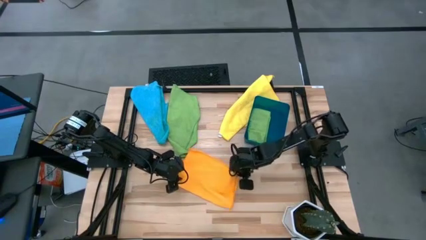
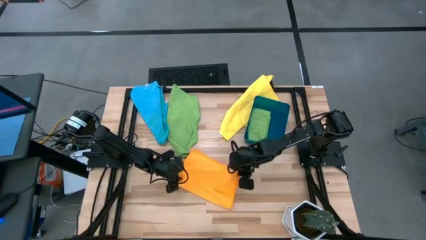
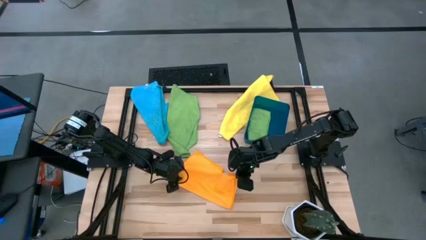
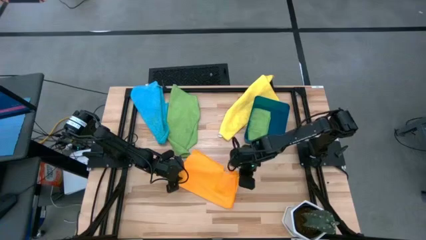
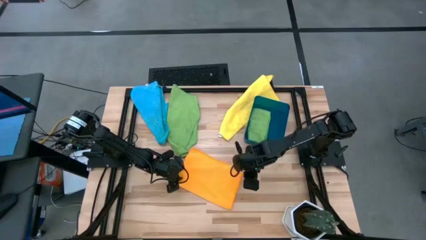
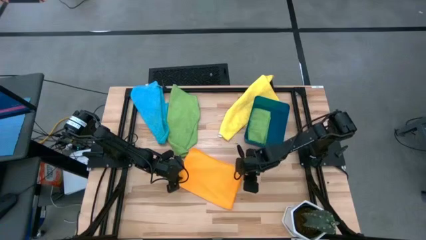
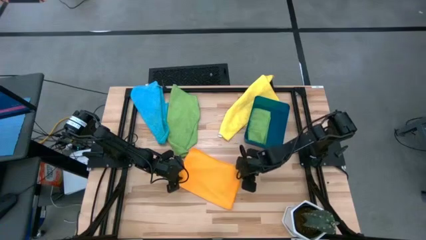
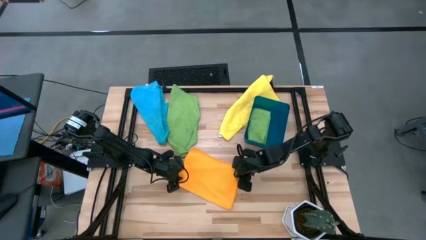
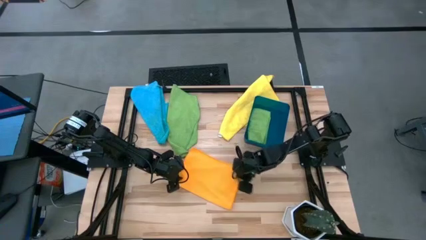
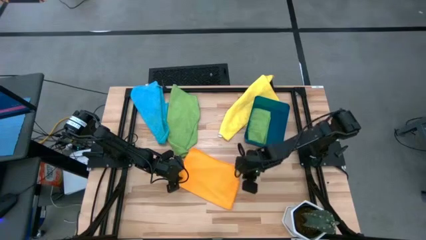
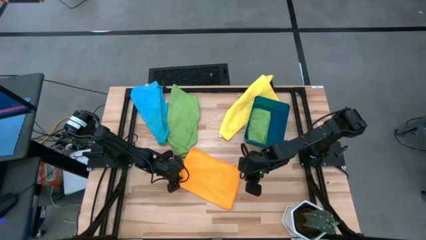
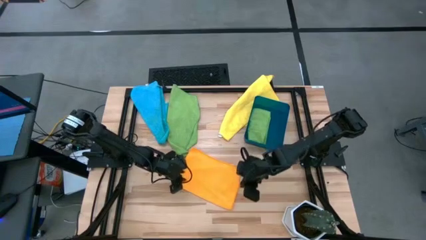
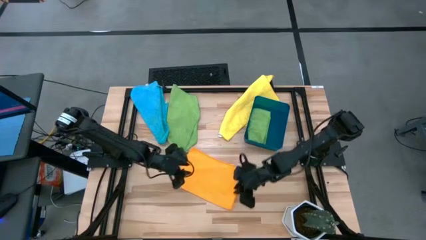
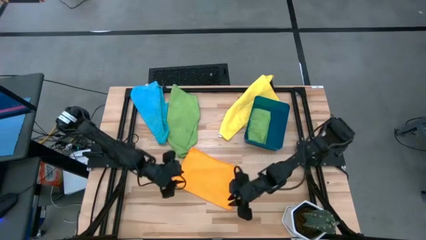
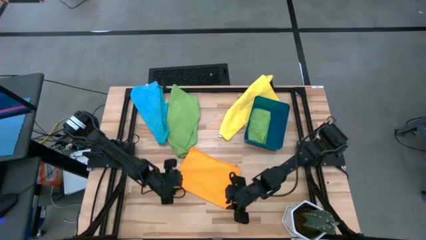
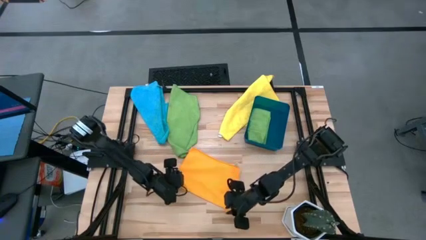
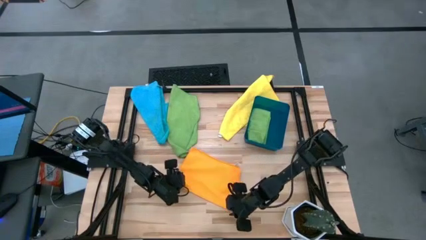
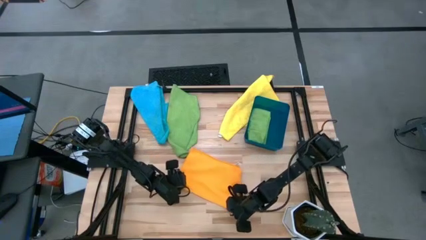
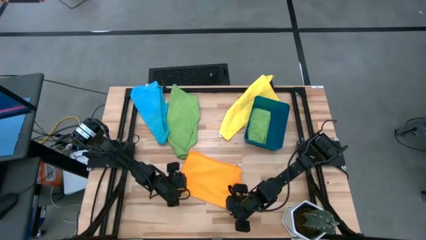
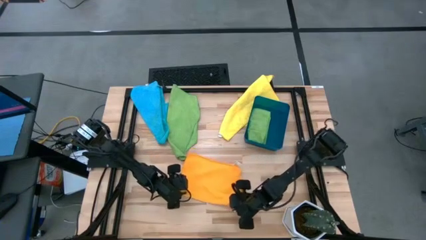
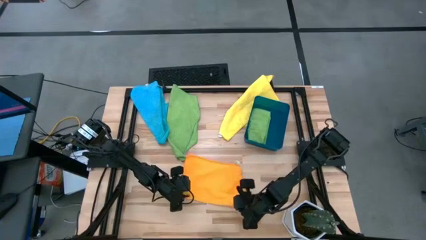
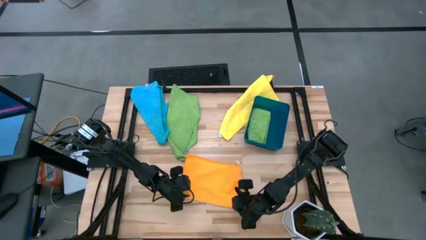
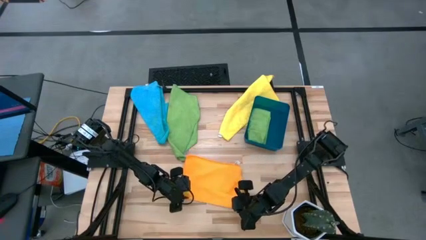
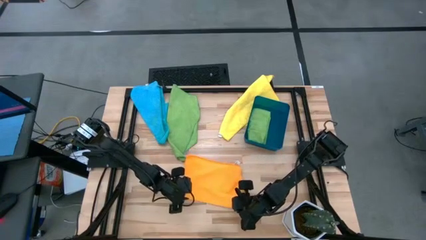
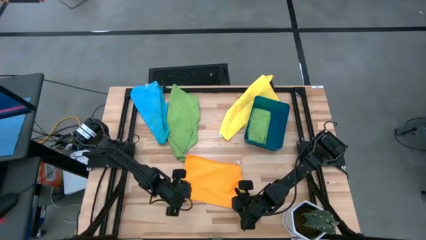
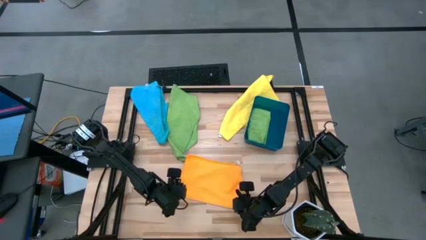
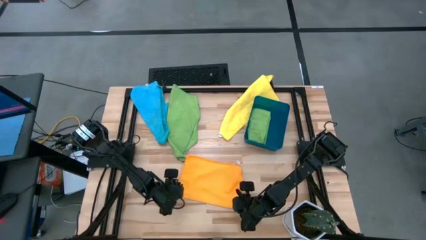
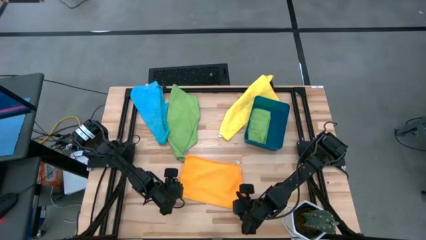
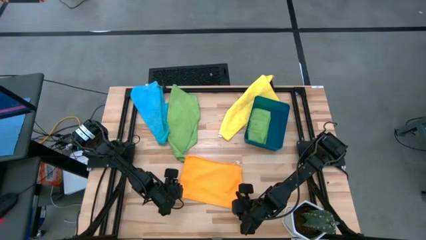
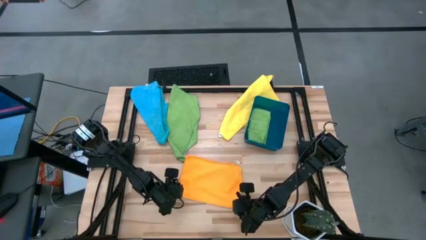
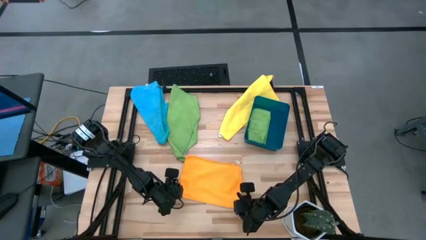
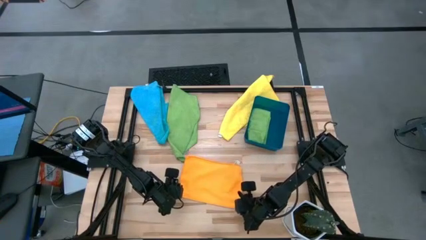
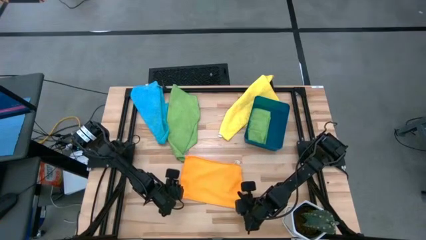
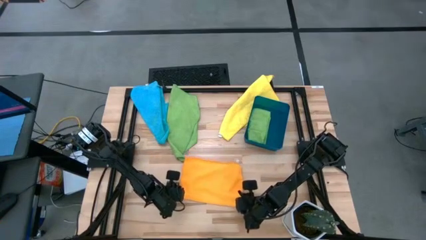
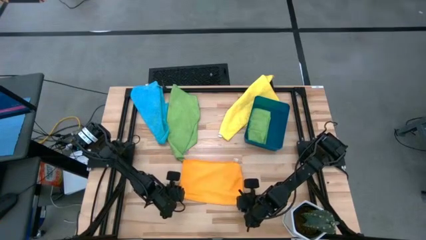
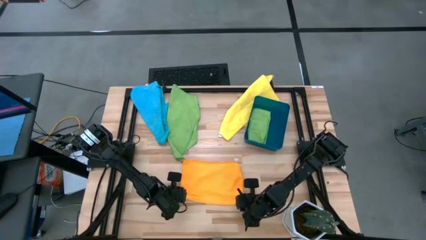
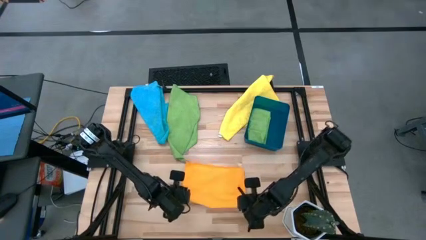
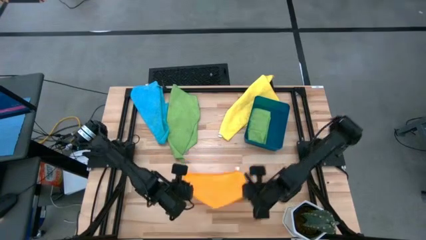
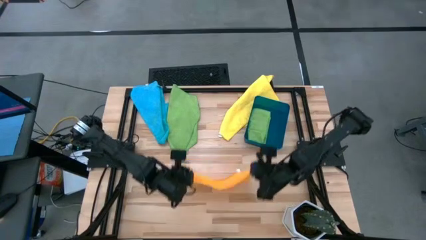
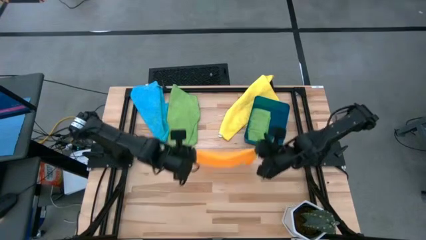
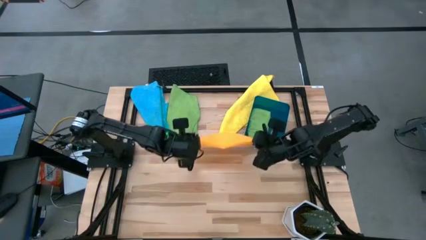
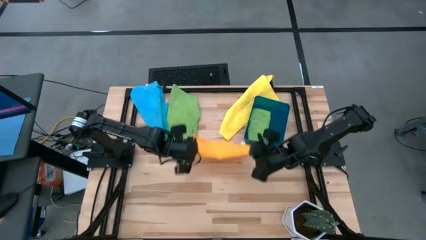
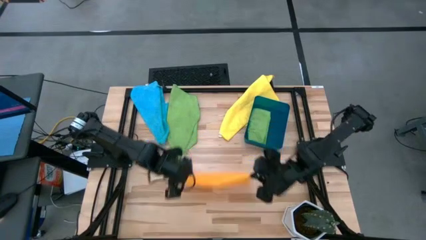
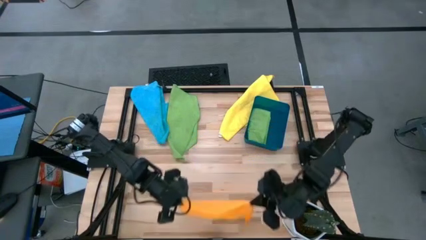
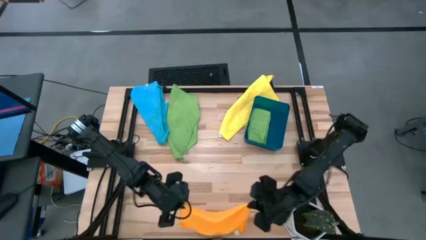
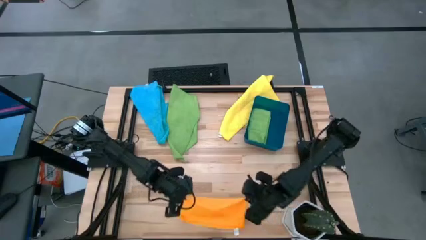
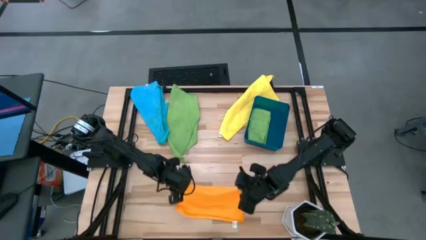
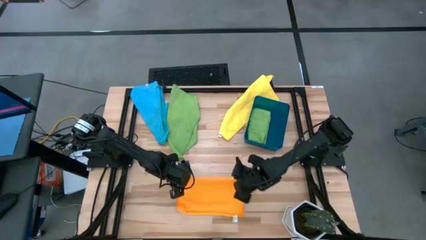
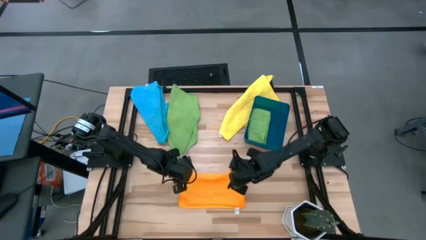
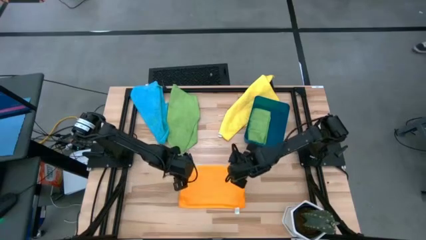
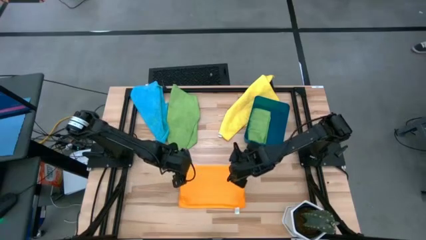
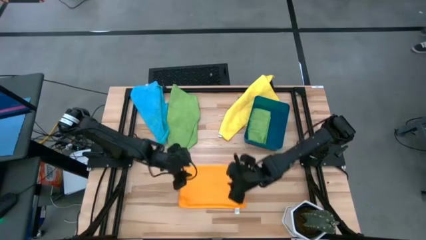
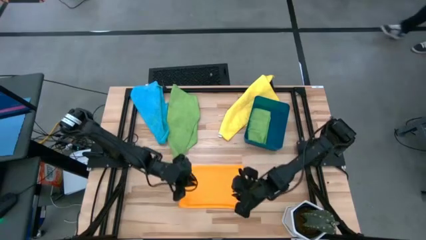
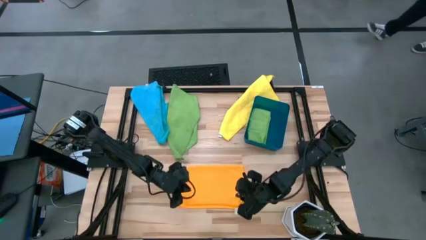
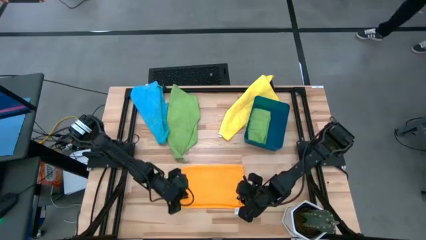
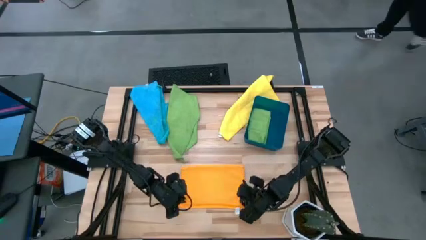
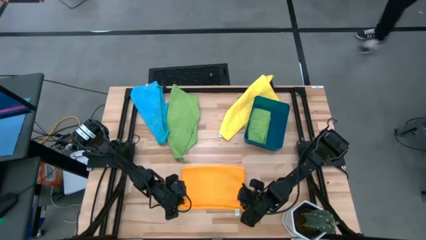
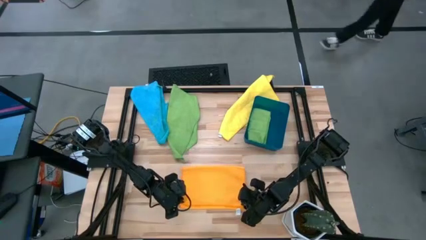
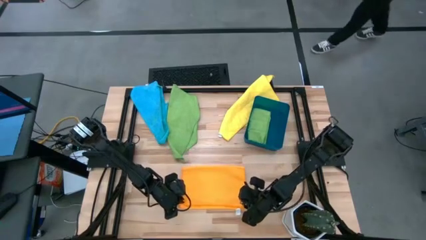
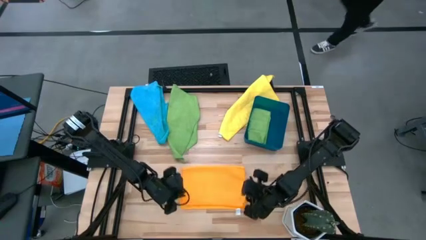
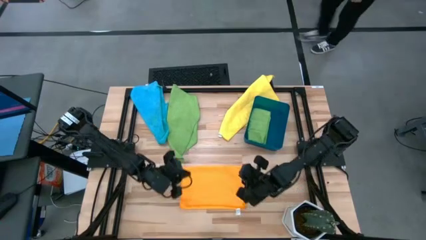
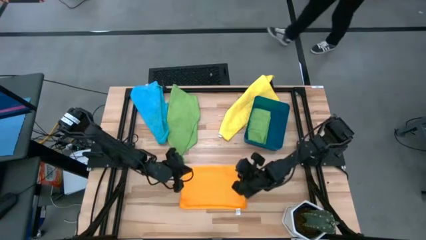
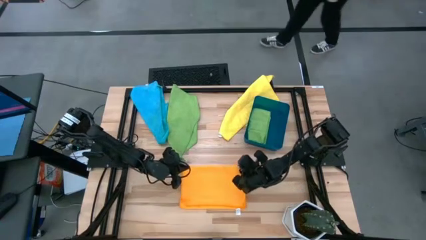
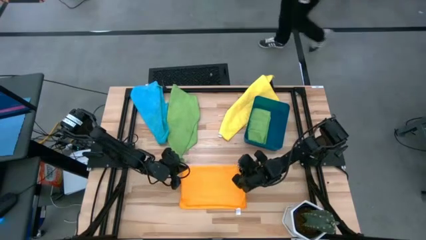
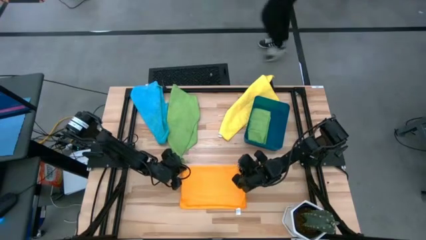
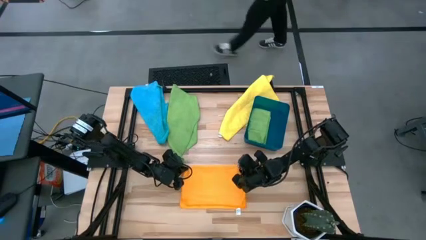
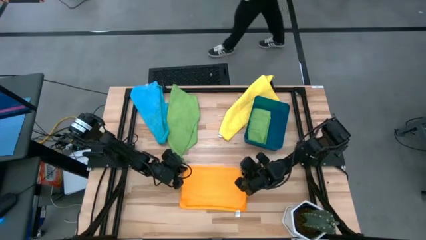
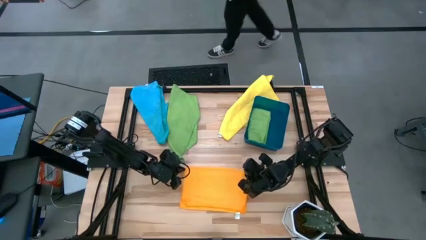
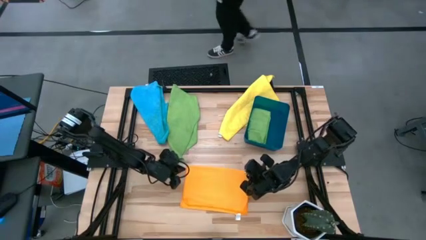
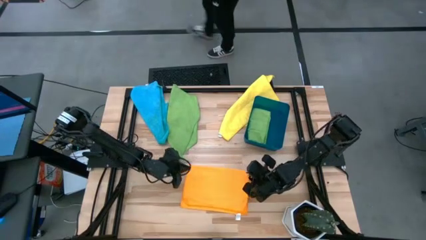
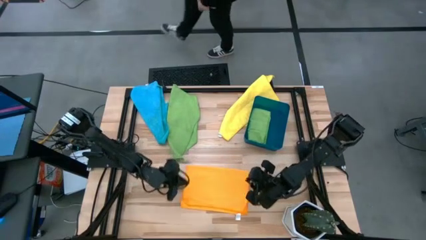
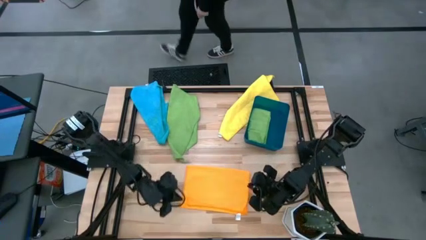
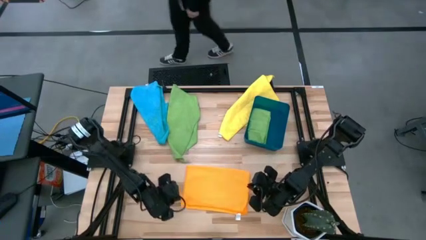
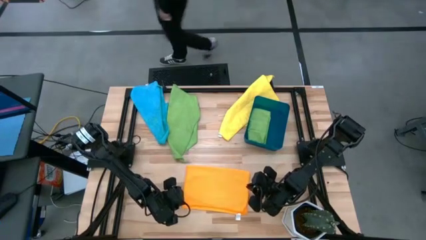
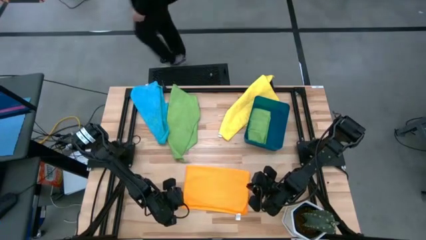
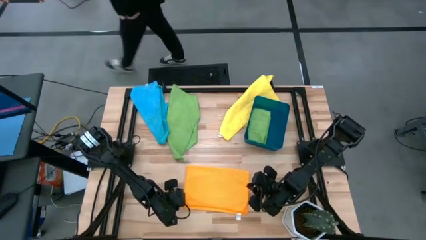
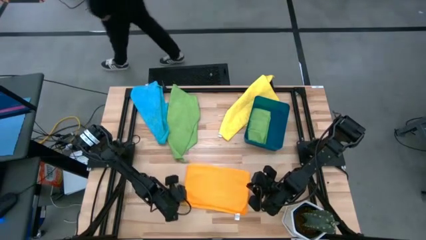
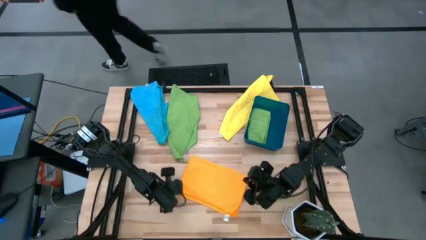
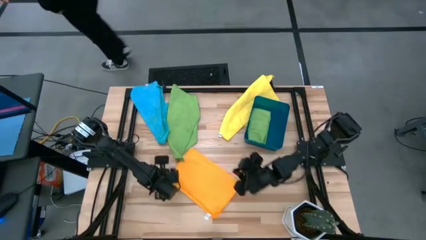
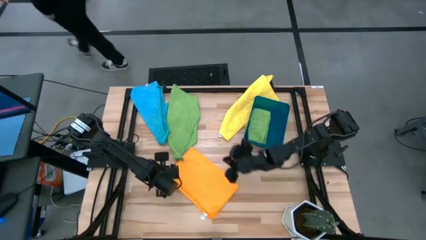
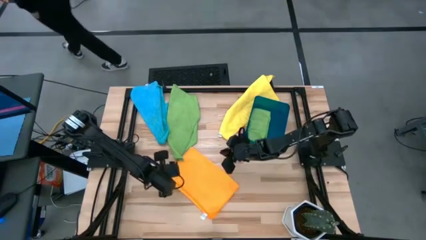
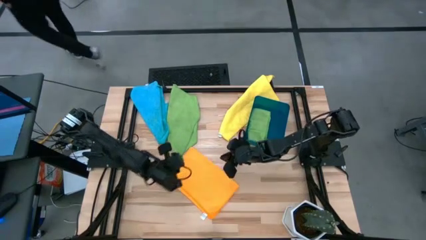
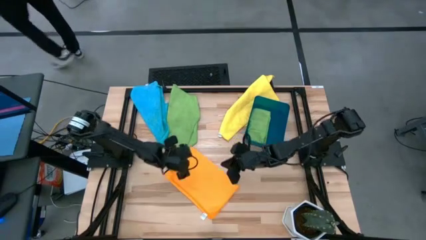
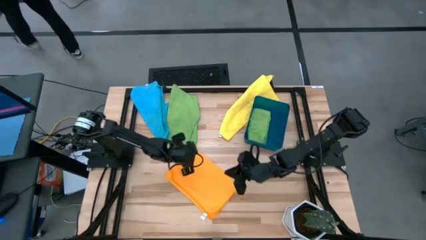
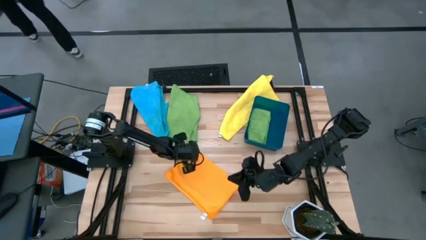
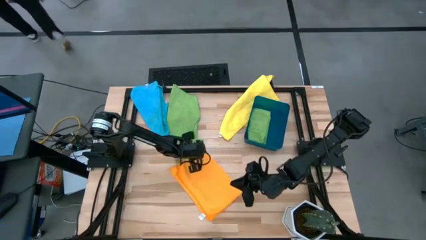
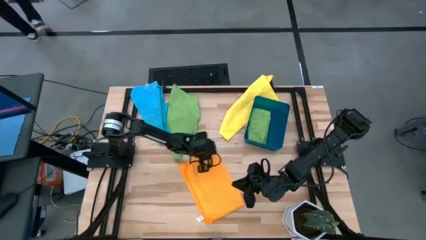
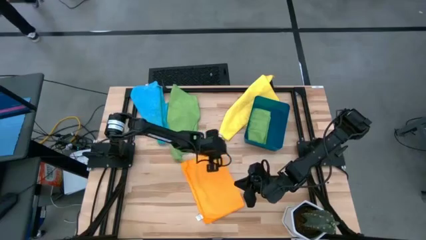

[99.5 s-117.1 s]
Task: Fold microfiber towels
Fold the orange microfiber cloth
